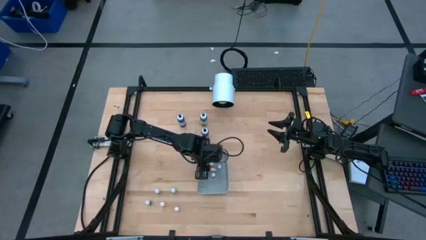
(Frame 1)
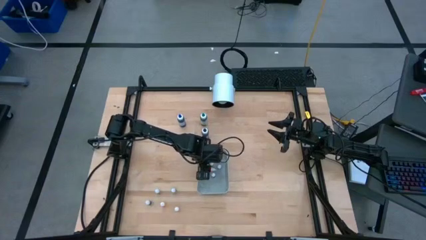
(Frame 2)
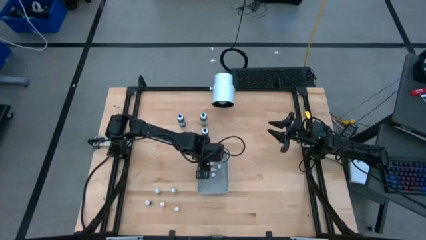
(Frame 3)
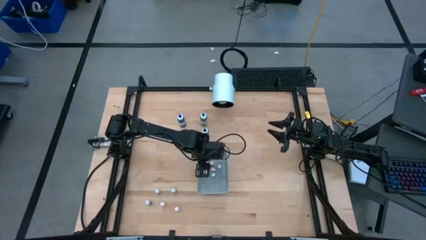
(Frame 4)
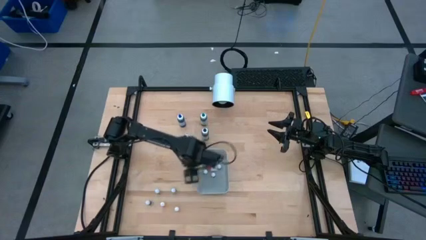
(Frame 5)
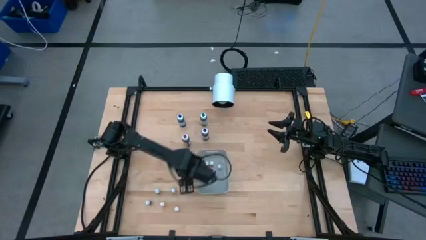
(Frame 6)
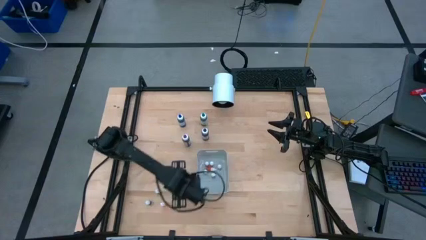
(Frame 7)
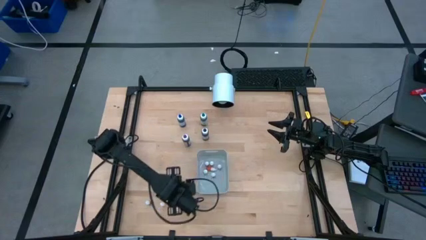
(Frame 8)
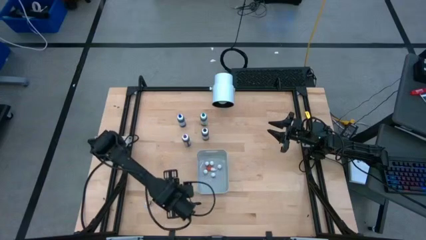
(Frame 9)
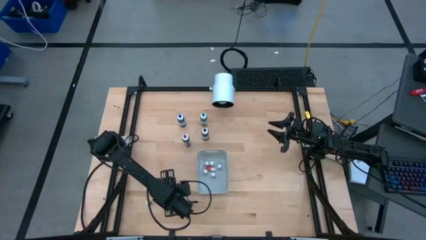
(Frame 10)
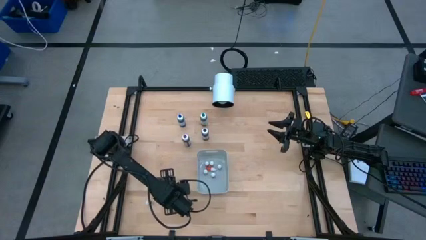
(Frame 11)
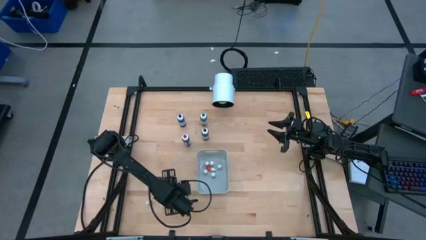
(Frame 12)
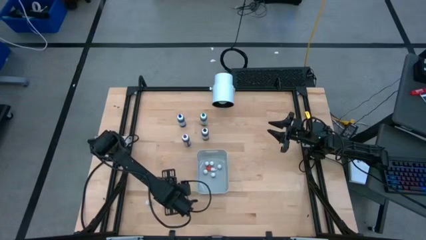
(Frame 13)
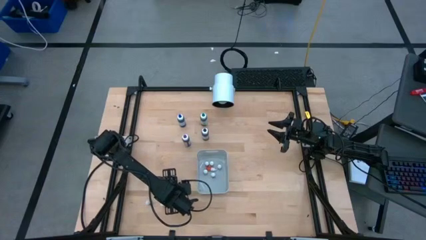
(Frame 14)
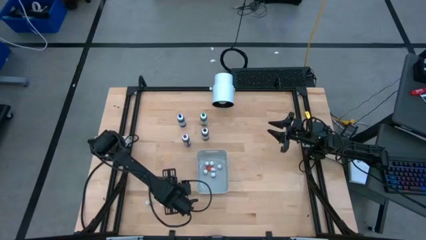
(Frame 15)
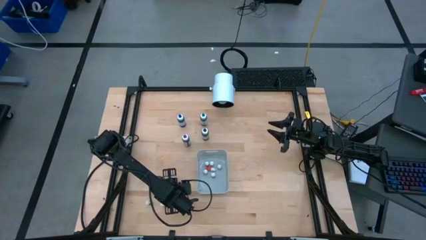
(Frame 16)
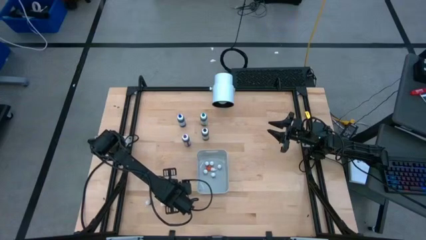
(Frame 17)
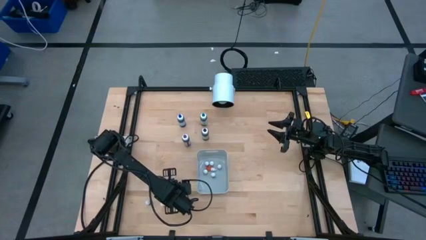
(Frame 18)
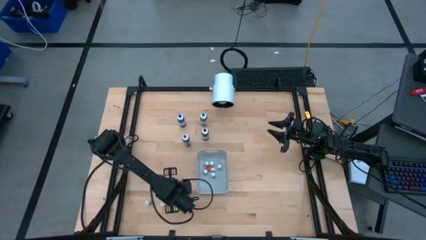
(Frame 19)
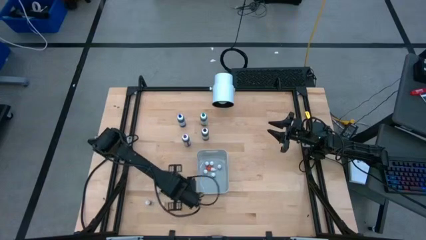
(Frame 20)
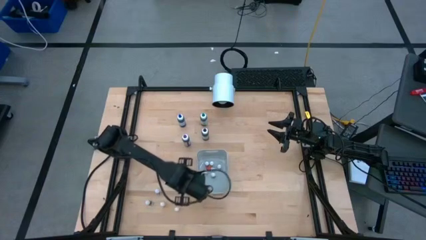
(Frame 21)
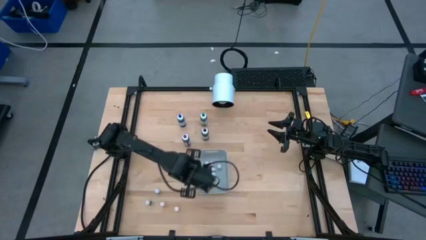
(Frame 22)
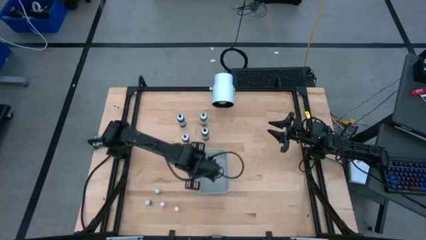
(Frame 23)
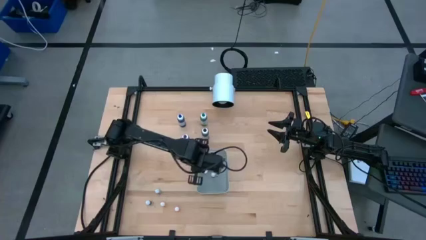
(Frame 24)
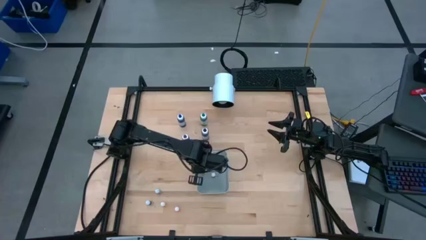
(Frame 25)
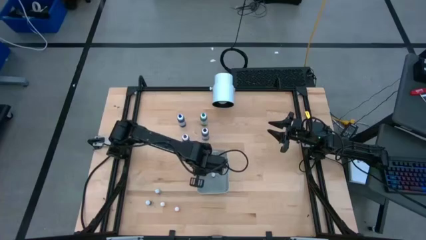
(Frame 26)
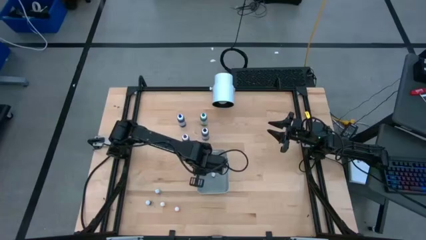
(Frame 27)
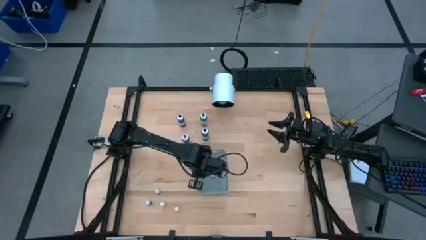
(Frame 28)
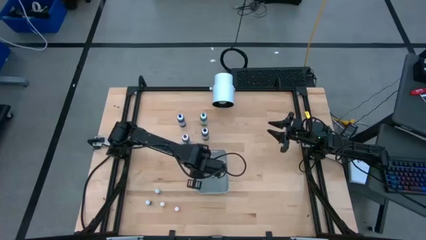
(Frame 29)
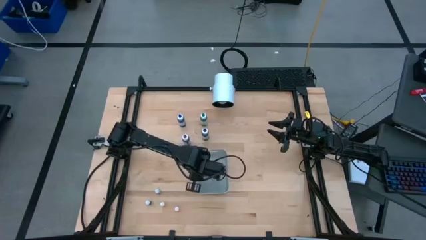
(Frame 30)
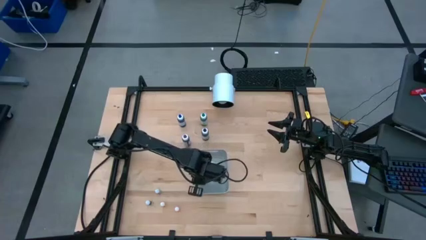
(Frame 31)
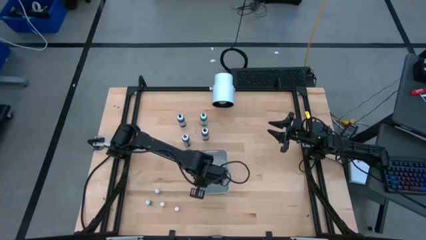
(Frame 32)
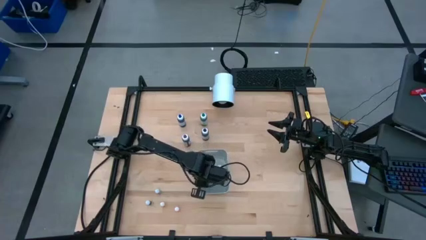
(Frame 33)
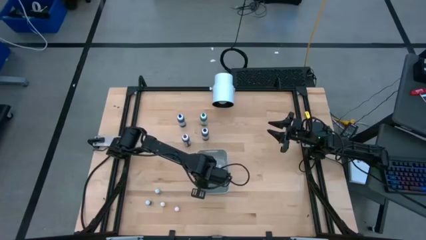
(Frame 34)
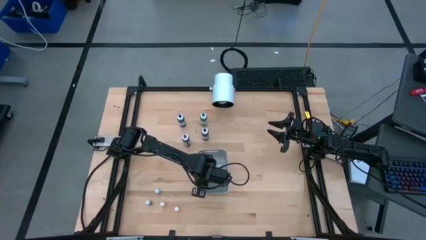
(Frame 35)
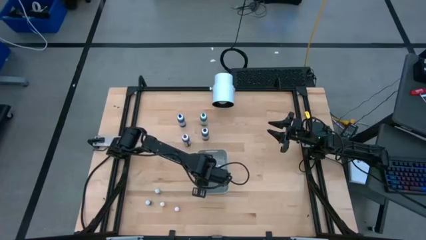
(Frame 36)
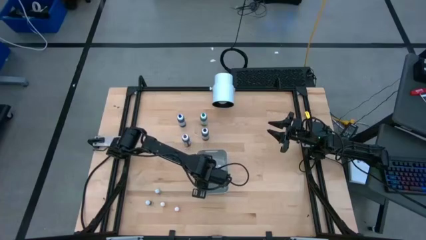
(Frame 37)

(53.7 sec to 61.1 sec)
Task: Pick & Place food coloring
Put the small black food coloring bottle into the gray bin

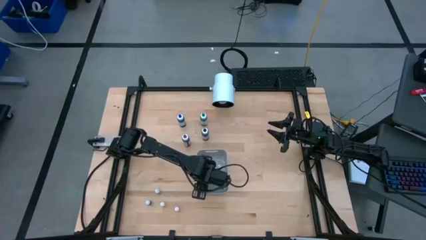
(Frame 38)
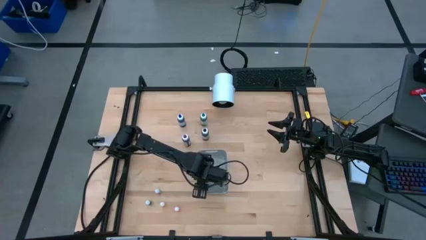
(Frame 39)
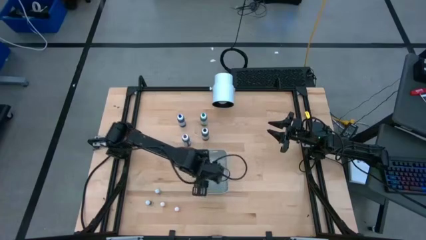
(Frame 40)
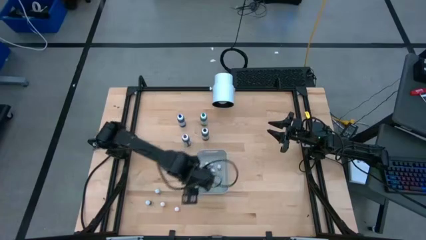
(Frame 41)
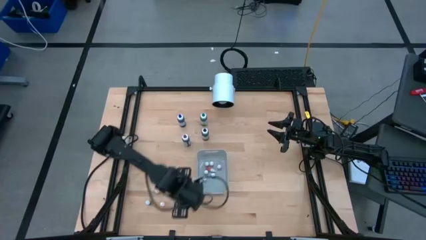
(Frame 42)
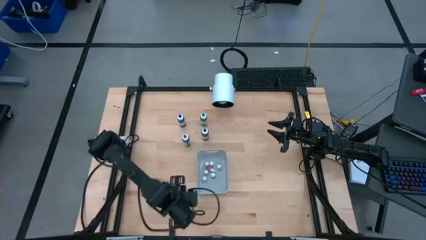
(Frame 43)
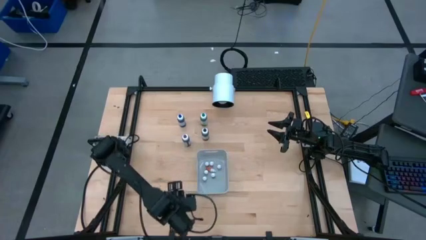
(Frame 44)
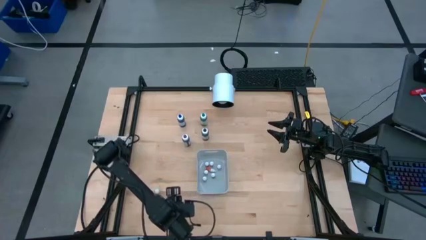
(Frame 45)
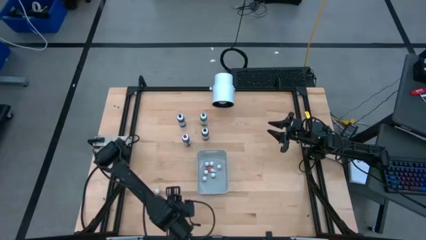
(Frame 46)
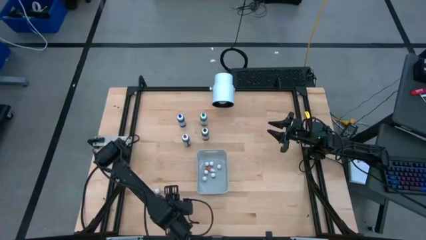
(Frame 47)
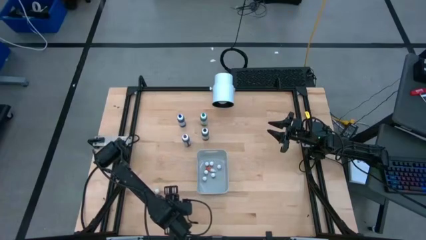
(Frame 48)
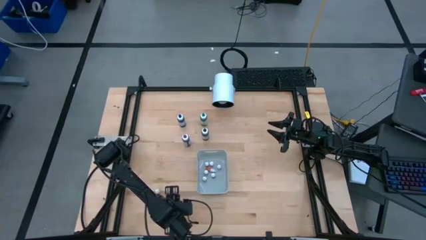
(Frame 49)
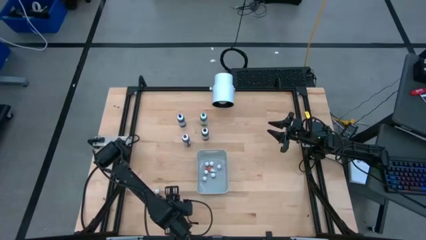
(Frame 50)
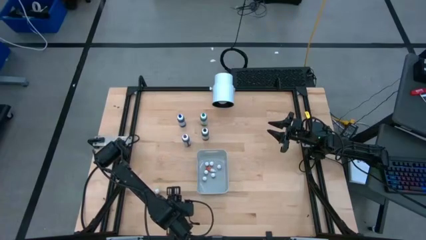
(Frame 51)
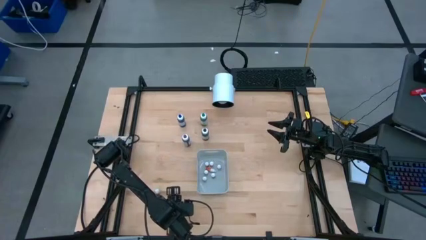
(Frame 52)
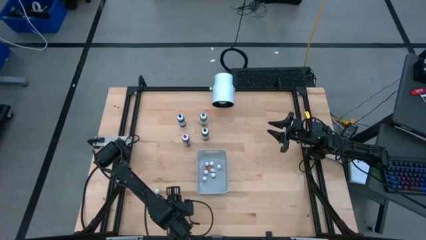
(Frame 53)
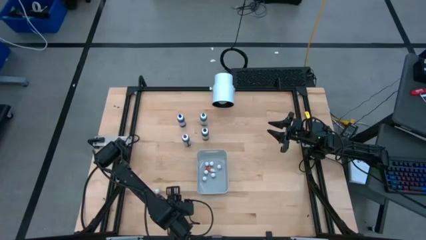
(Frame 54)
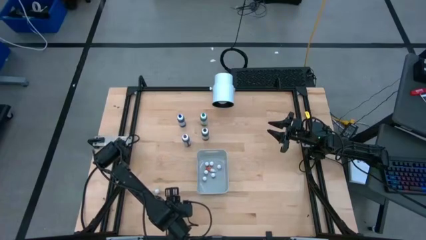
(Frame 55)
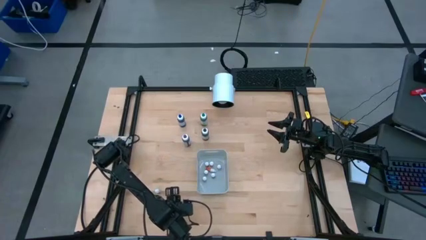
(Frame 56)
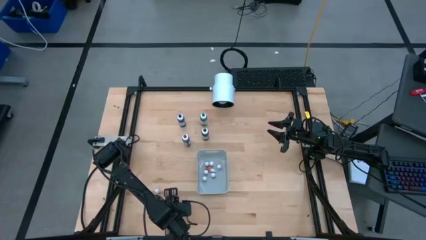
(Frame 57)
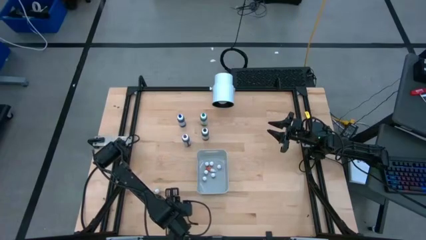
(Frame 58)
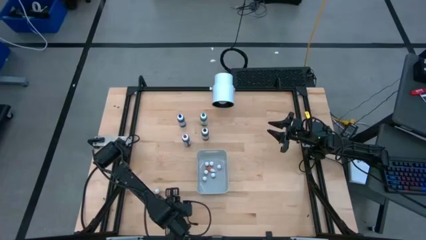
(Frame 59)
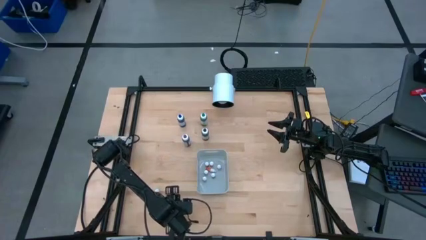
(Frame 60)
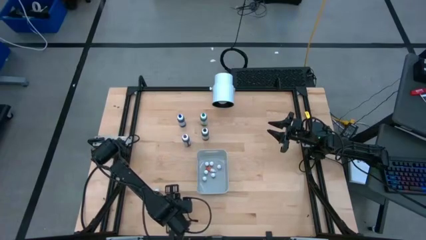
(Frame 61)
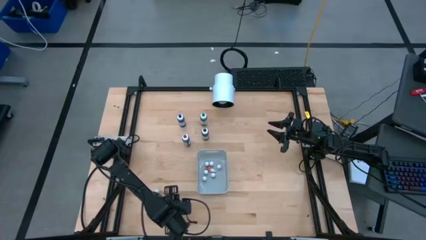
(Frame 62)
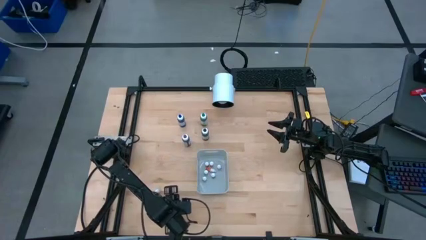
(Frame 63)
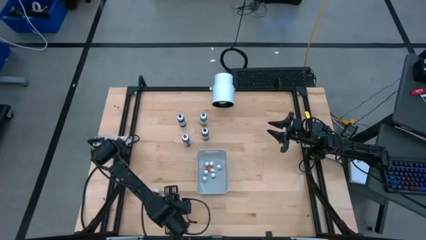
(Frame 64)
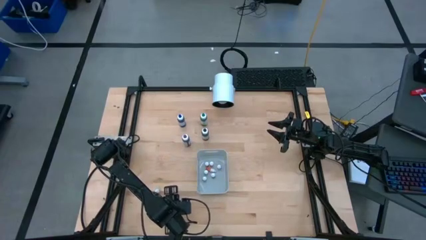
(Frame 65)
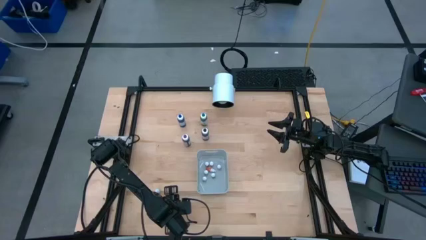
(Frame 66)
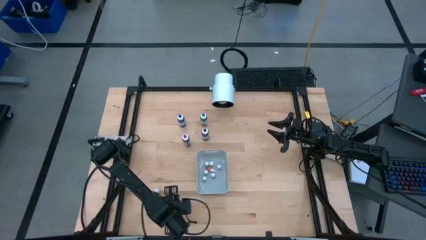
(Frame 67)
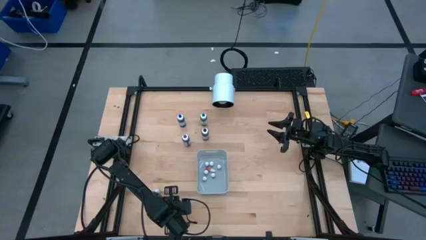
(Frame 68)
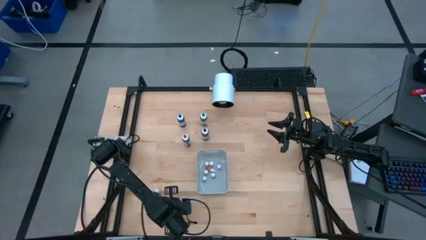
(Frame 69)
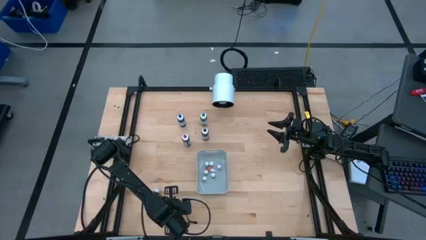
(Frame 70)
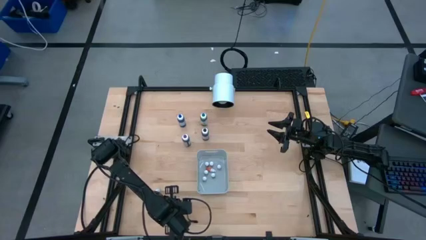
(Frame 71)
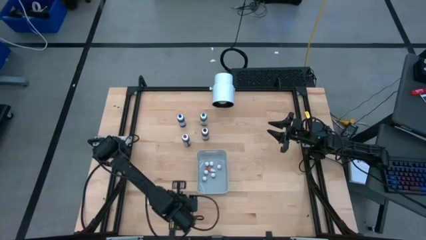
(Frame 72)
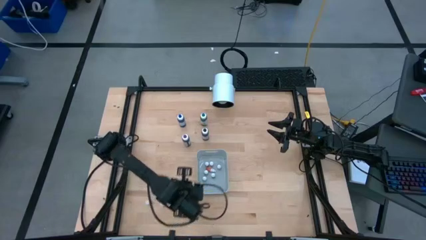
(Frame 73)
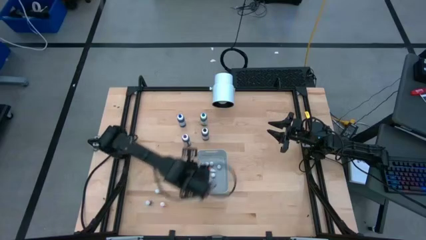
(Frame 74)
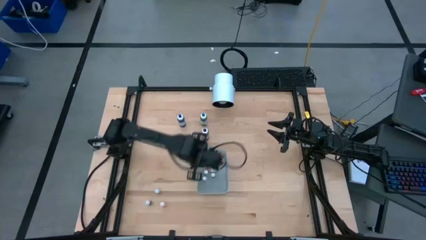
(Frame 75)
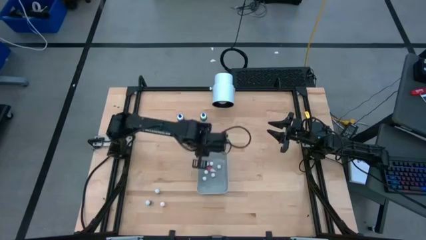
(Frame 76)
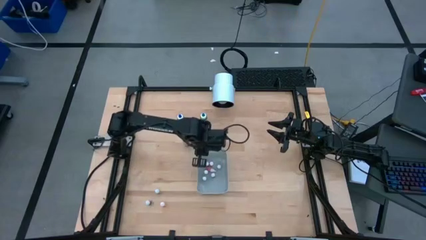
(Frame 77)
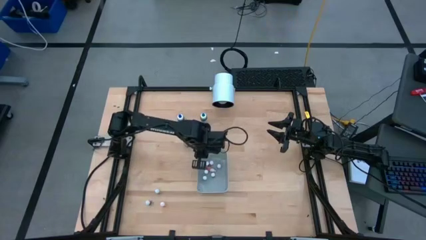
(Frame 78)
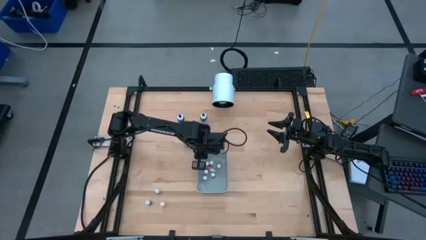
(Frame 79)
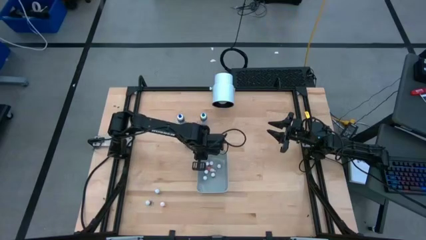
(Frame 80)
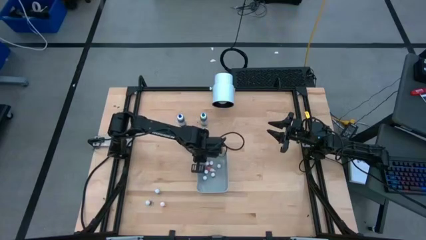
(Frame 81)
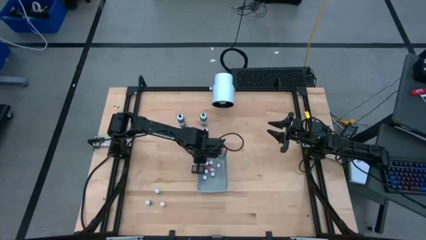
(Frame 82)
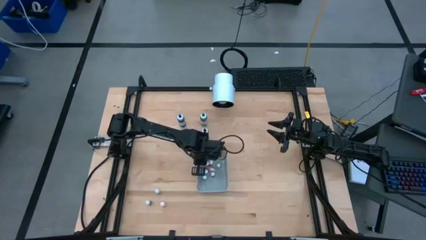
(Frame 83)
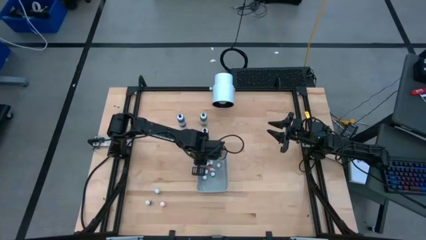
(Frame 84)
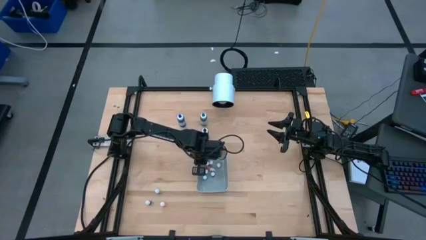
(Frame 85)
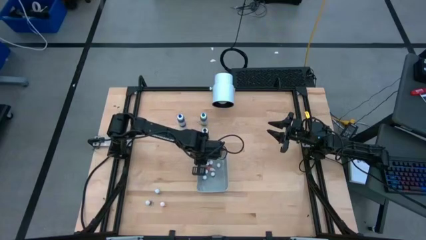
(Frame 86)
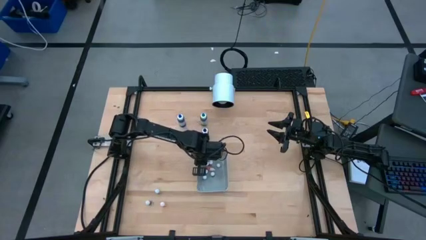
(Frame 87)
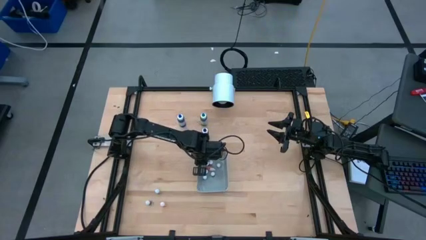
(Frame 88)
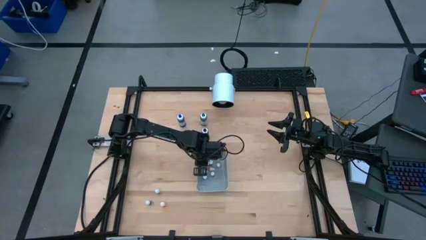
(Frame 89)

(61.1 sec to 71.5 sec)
Put the small orange food coloring bottle into the gray bin
